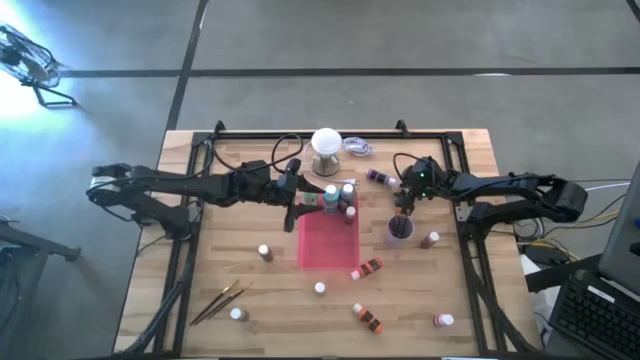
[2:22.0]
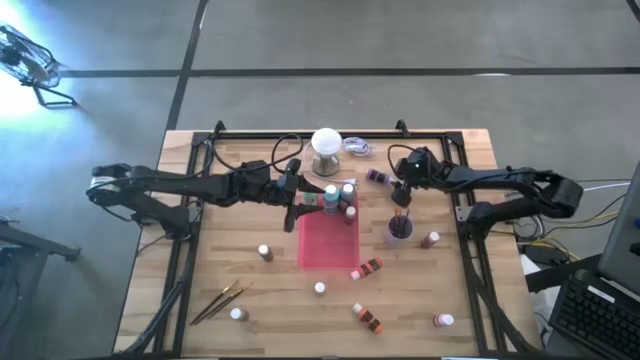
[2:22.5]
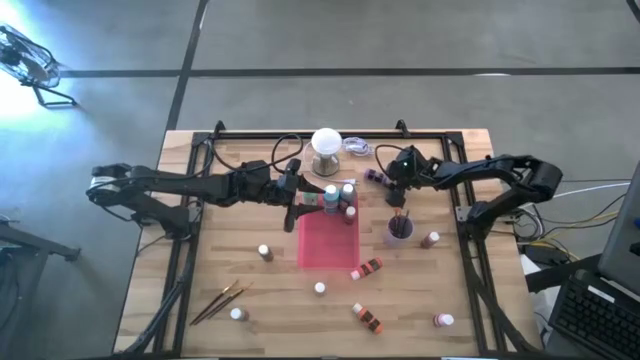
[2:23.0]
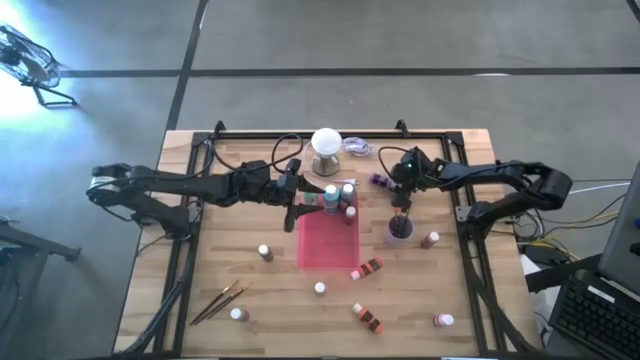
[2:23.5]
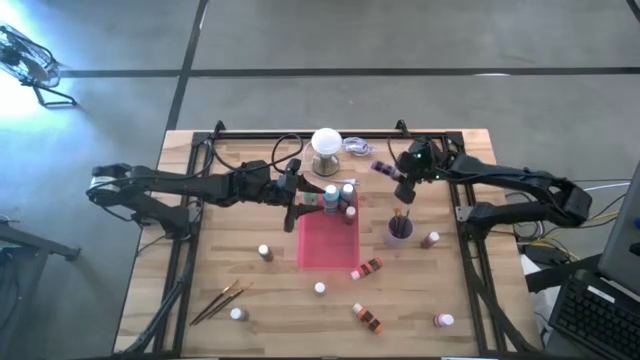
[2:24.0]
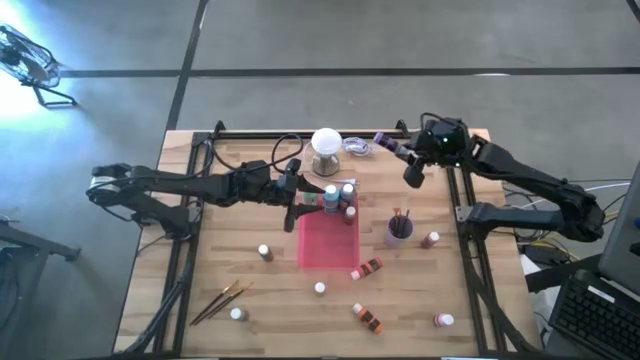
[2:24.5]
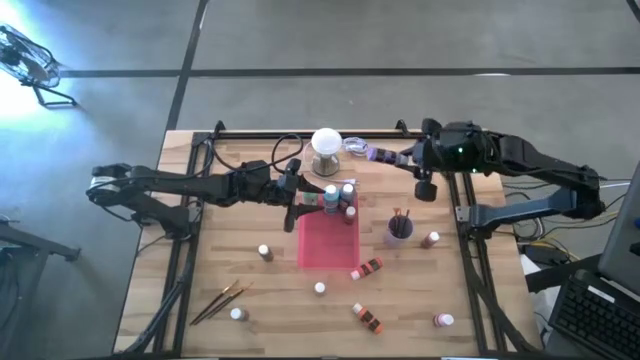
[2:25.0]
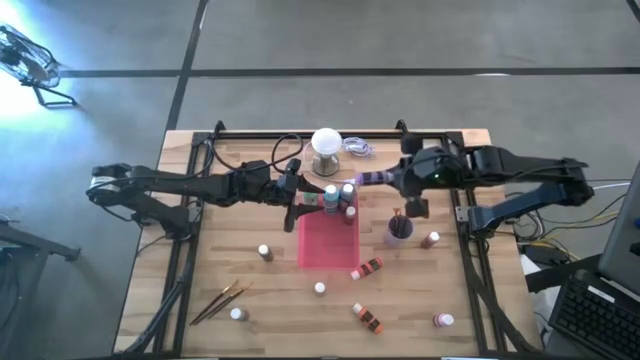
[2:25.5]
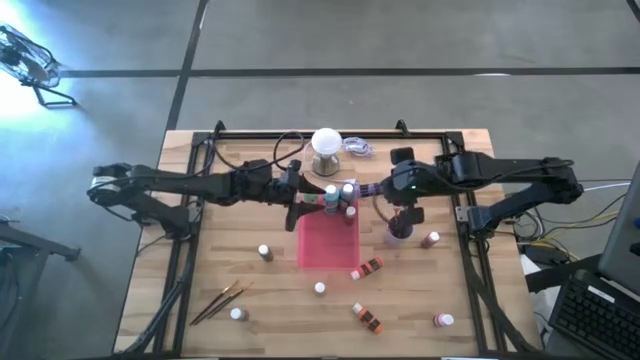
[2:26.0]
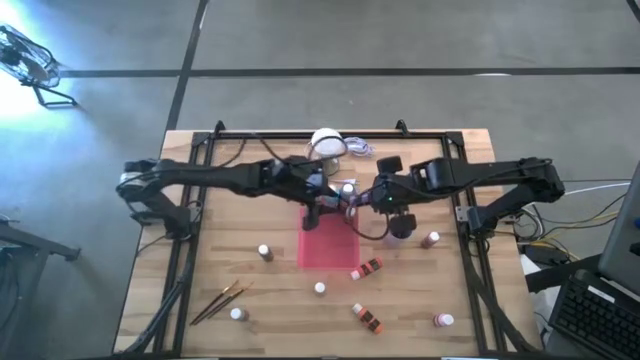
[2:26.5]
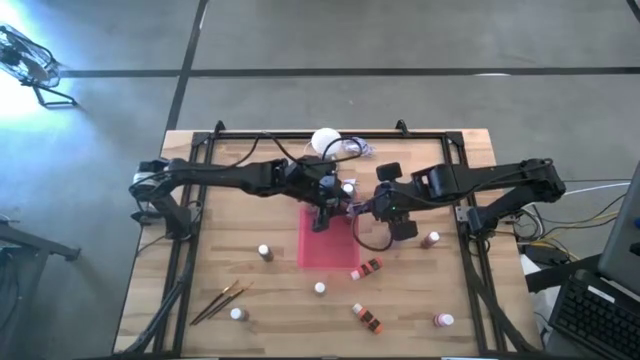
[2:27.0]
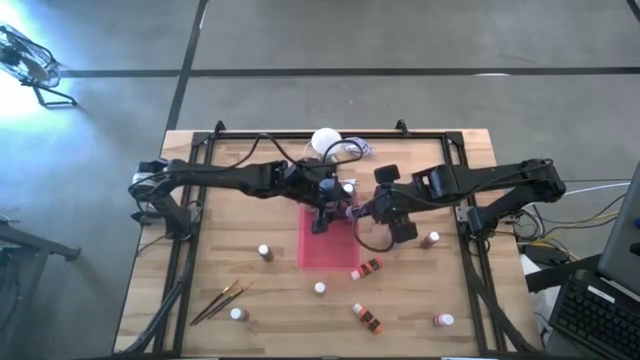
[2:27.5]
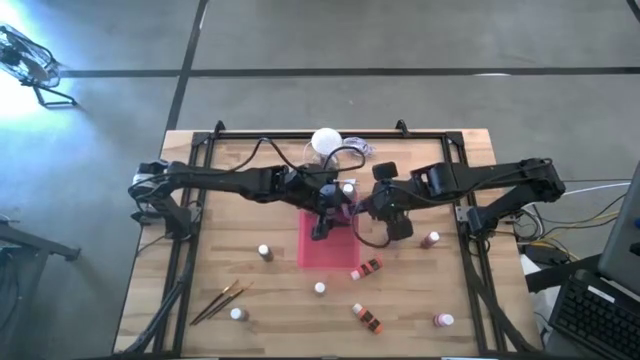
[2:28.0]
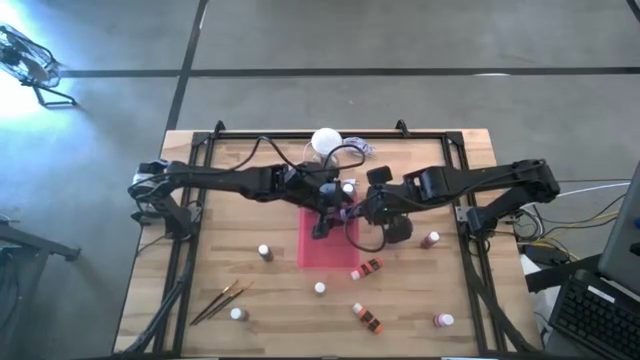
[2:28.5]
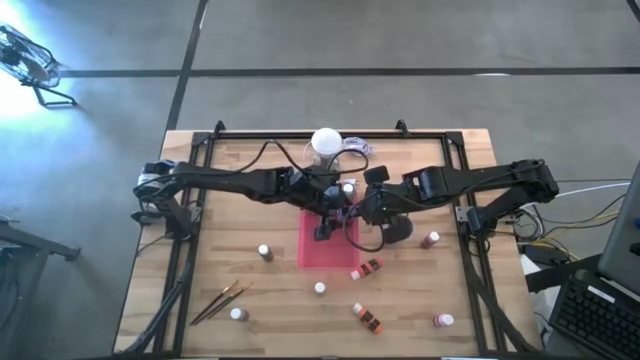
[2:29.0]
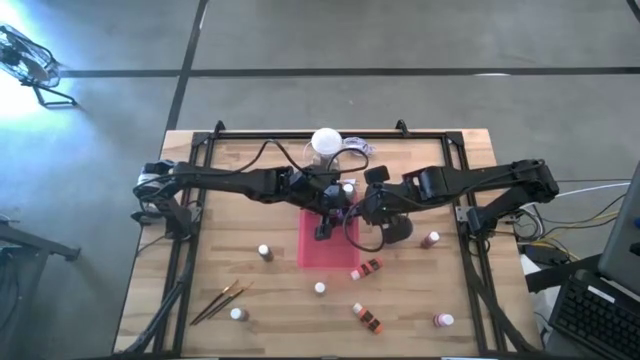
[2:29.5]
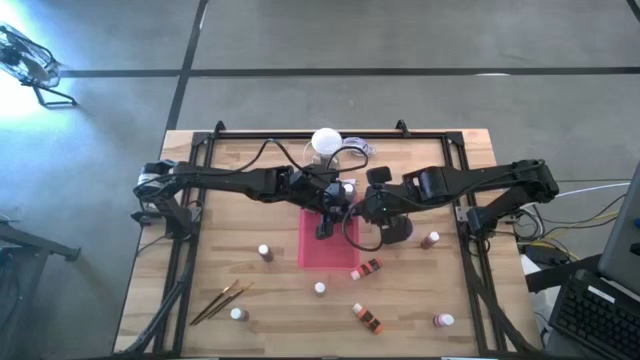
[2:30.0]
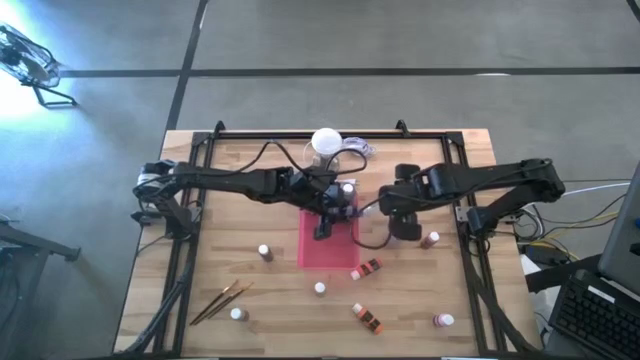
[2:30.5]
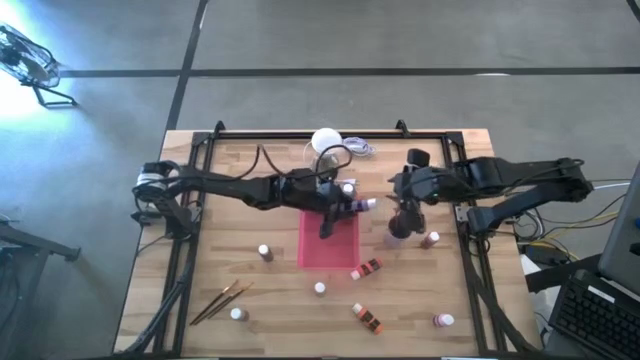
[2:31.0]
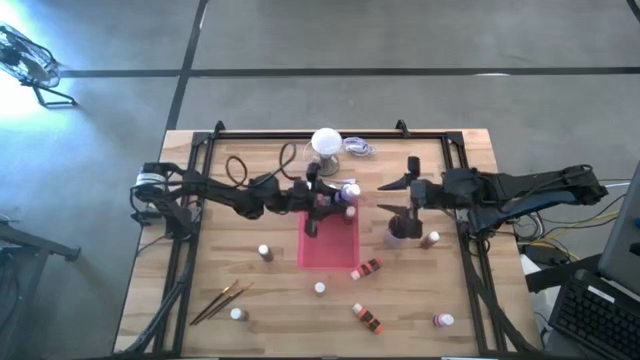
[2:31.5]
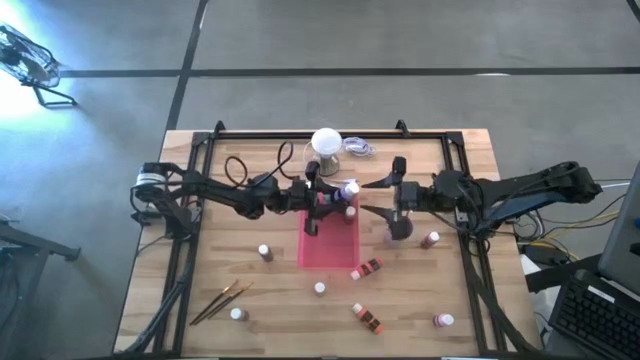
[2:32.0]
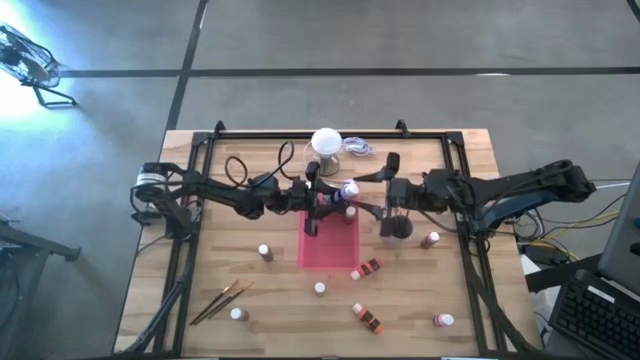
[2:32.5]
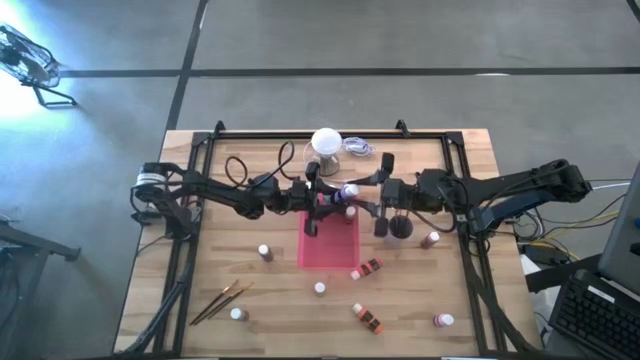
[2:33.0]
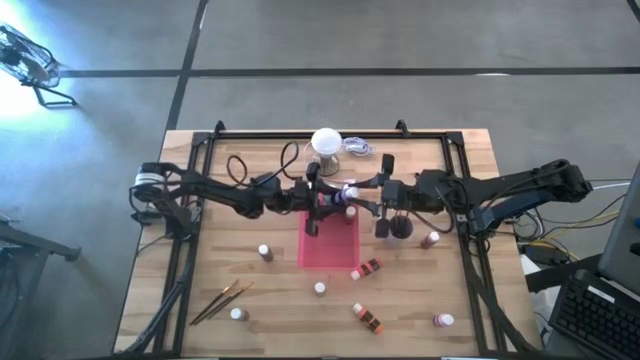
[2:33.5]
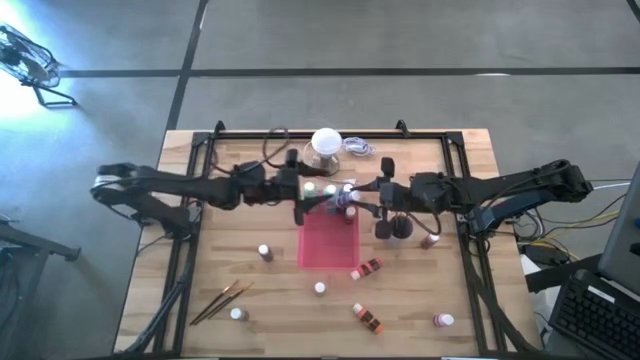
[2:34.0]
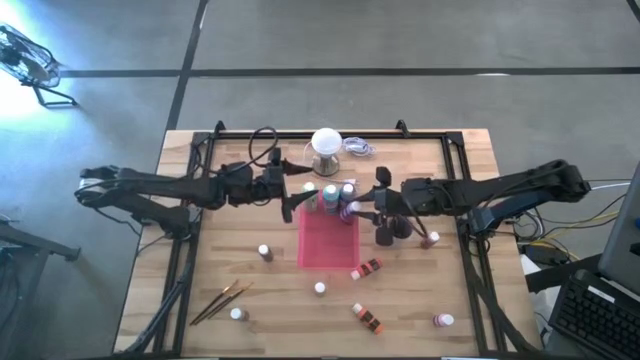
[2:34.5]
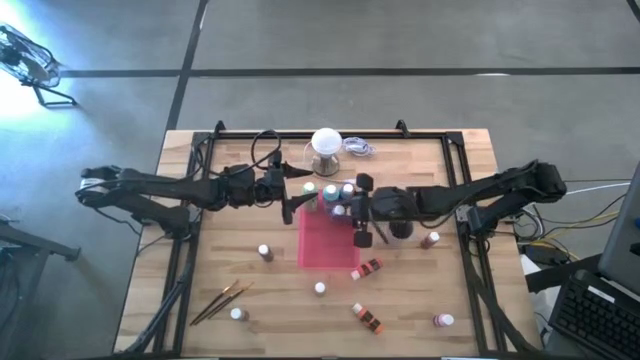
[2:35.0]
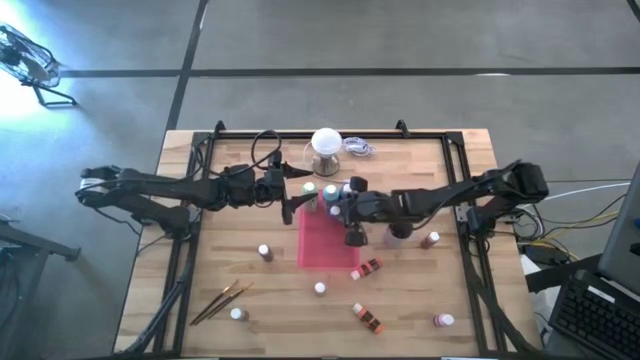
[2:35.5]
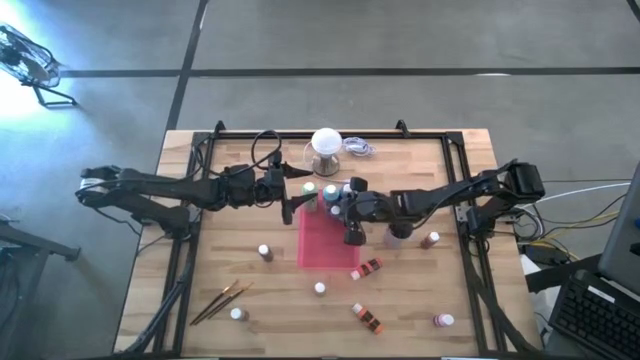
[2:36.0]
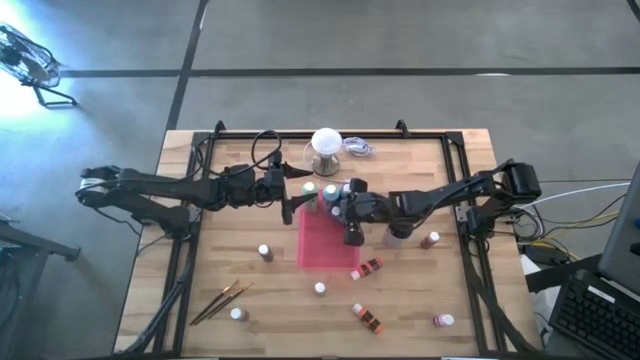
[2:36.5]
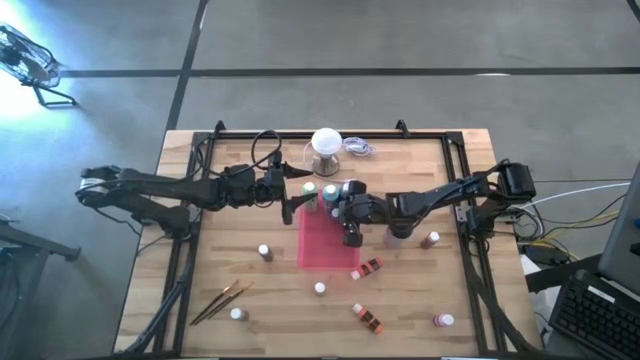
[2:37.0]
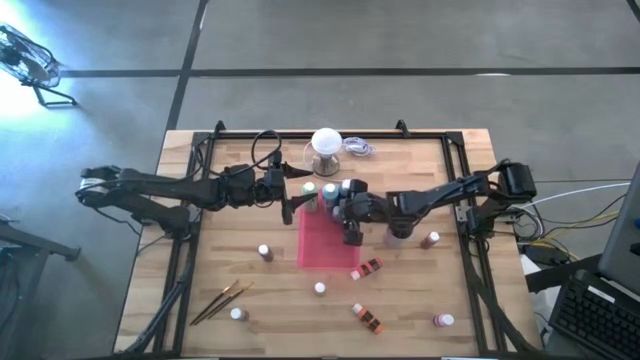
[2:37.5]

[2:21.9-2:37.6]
Task: Pick & Place Paint Supplies
Put the small purple paint bottle into the red bin

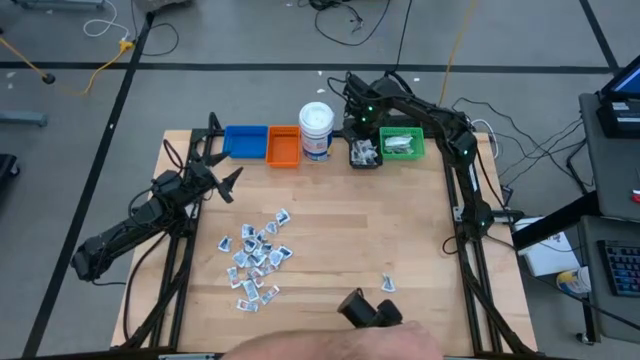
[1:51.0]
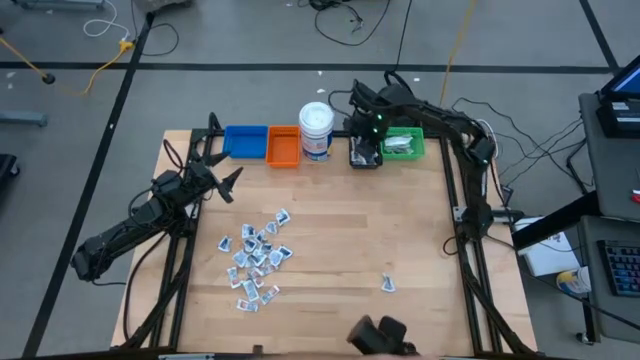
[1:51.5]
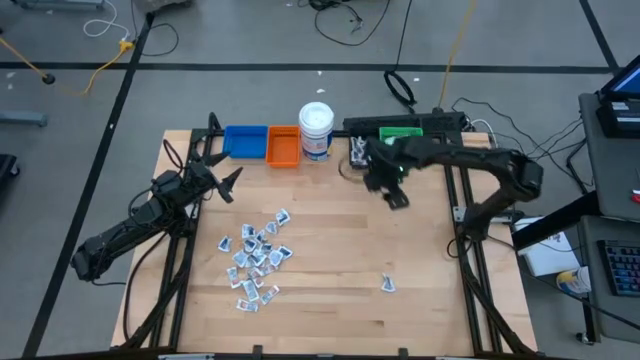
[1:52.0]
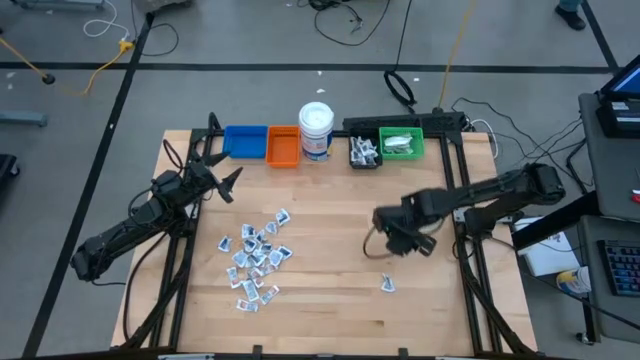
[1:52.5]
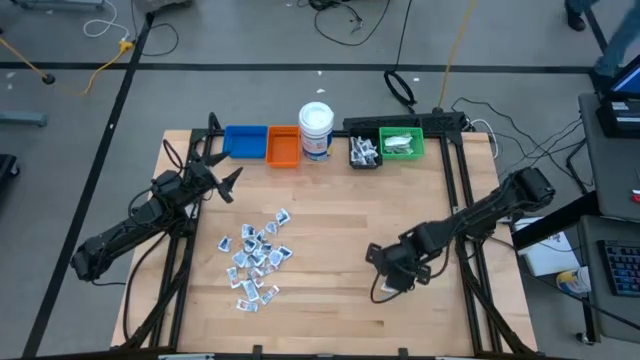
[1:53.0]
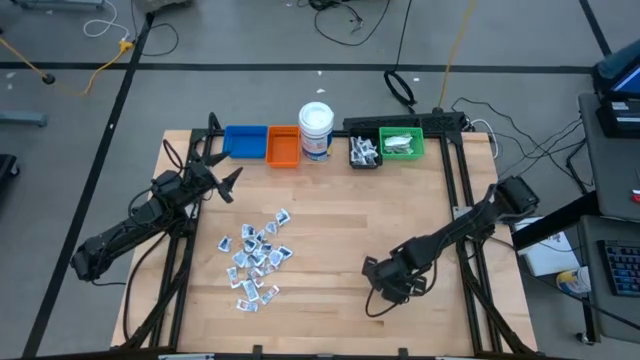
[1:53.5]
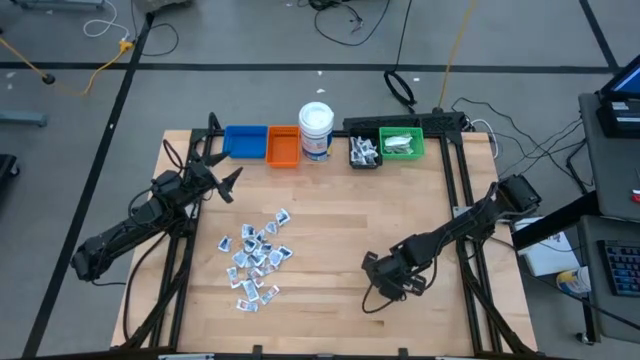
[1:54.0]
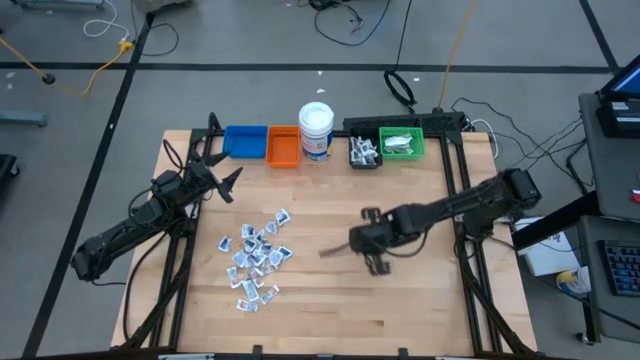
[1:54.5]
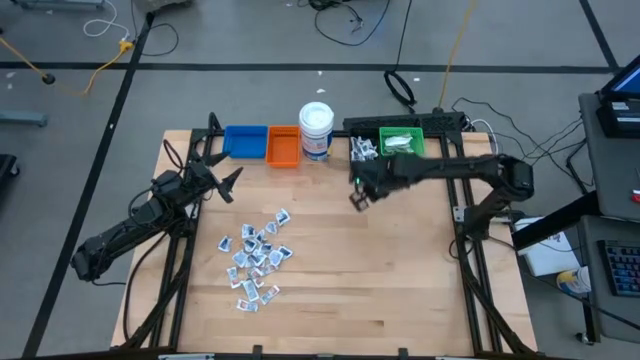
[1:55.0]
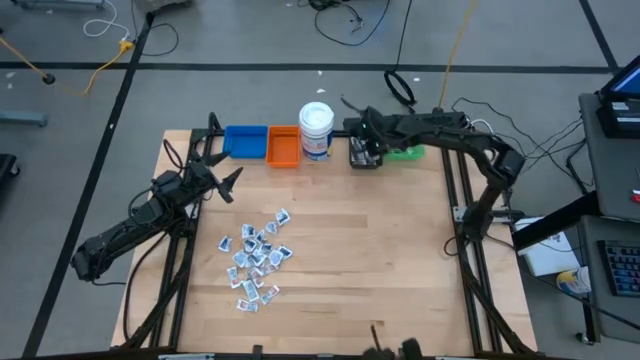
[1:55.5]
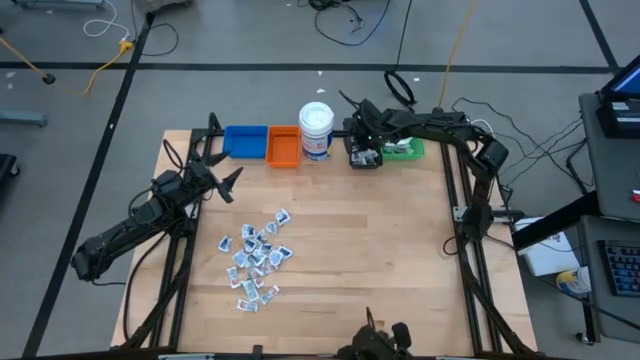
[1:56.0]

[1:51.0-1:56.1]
Task: Pick & Place First Aid Supplies
Put the towelette pack into the black bin
